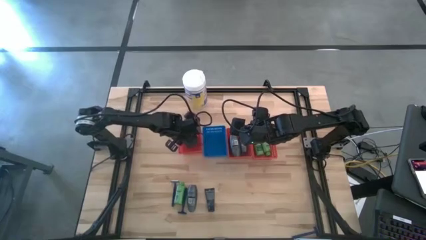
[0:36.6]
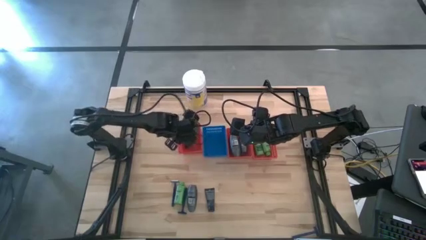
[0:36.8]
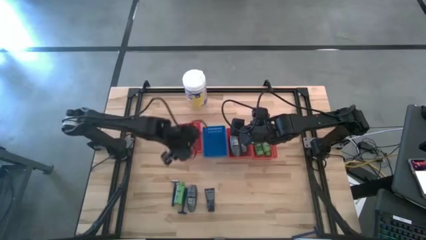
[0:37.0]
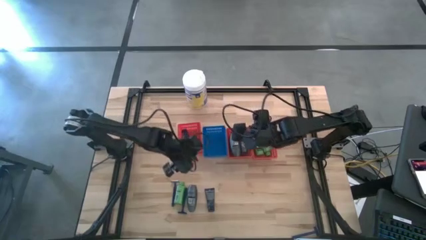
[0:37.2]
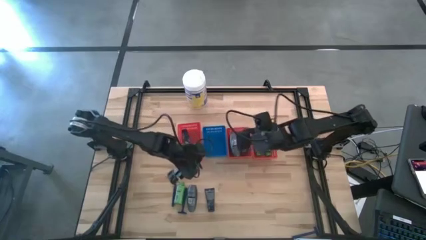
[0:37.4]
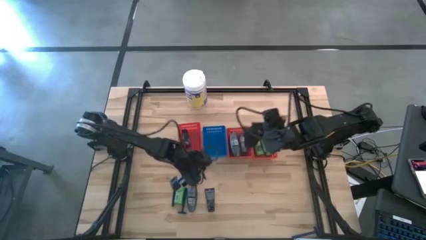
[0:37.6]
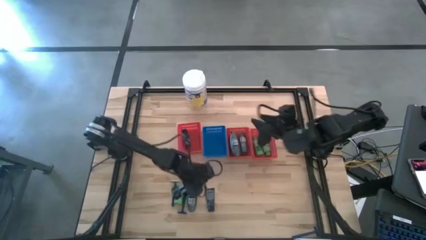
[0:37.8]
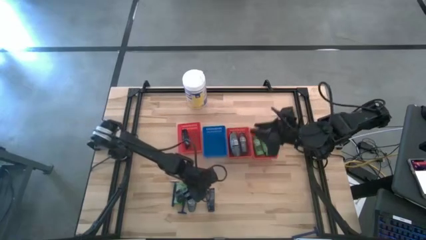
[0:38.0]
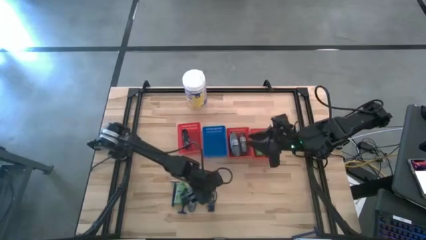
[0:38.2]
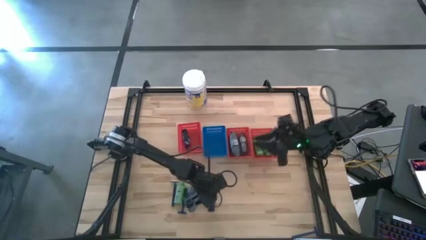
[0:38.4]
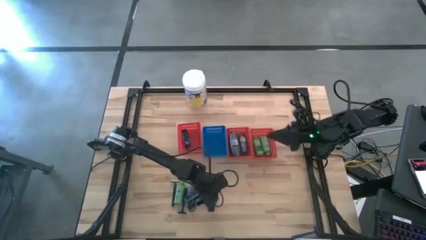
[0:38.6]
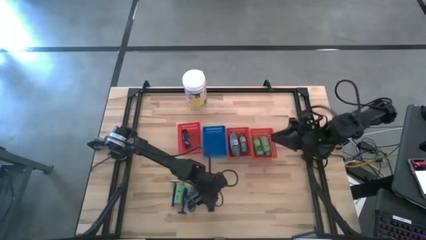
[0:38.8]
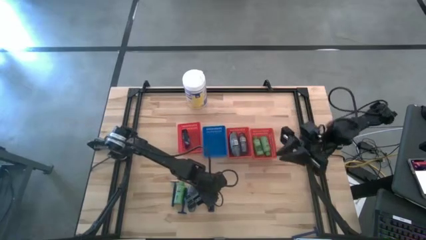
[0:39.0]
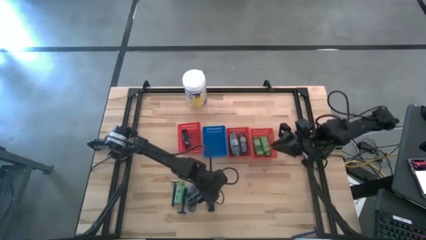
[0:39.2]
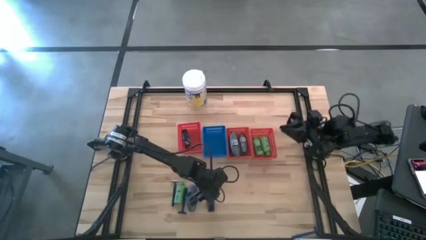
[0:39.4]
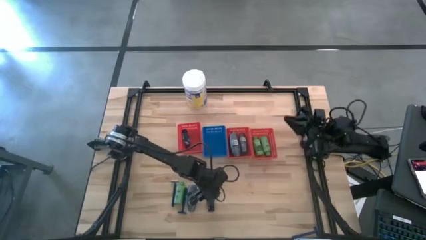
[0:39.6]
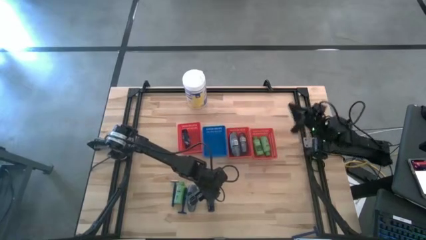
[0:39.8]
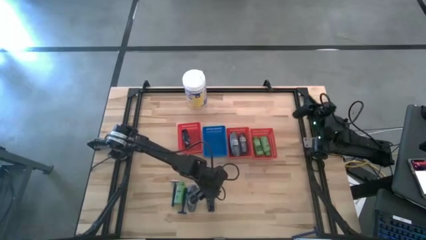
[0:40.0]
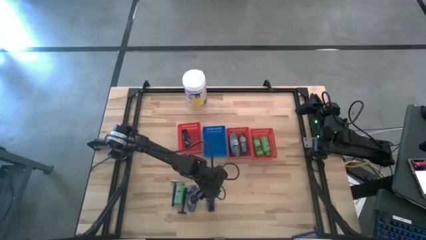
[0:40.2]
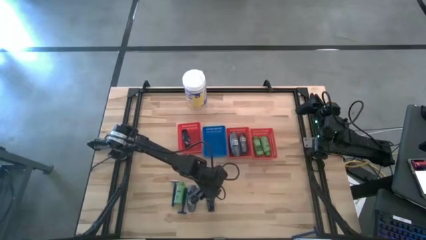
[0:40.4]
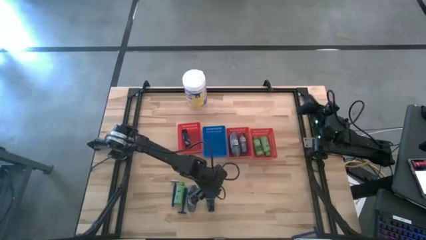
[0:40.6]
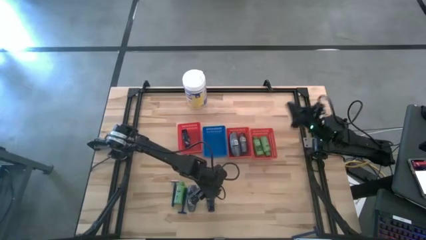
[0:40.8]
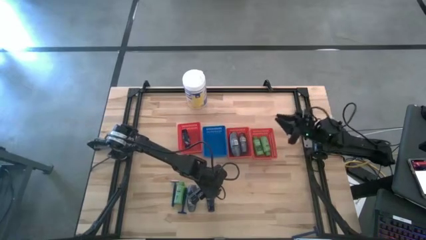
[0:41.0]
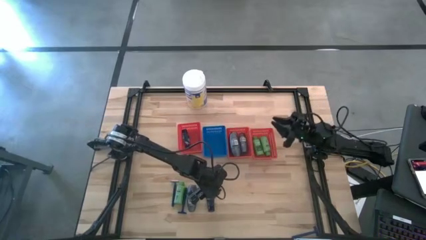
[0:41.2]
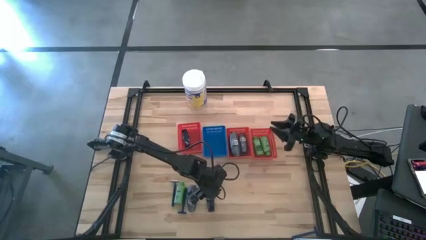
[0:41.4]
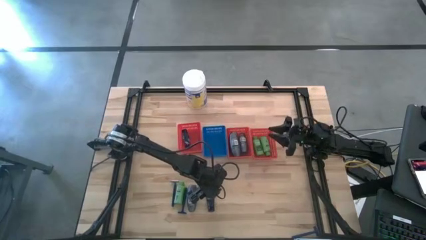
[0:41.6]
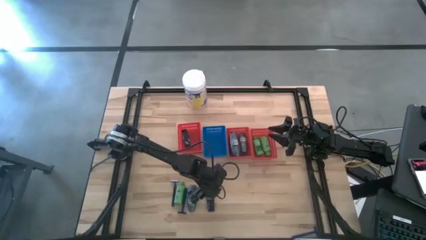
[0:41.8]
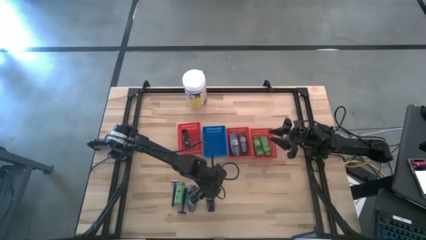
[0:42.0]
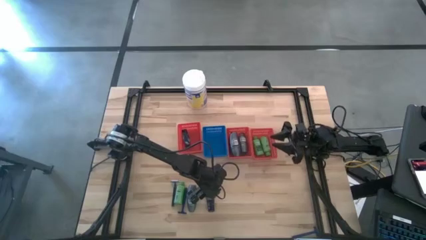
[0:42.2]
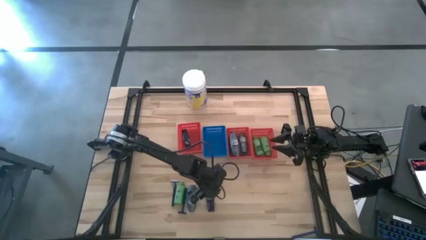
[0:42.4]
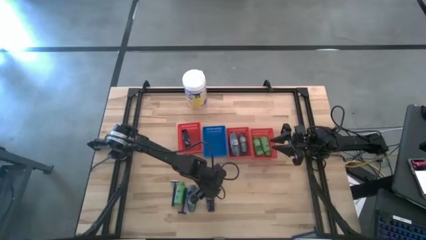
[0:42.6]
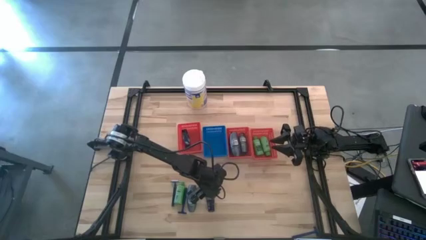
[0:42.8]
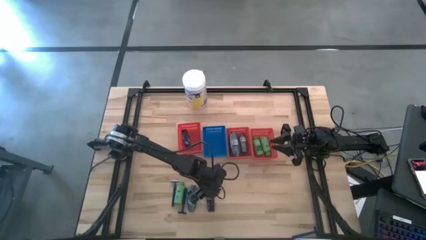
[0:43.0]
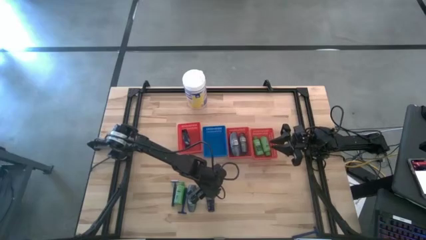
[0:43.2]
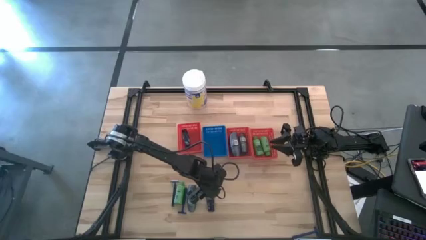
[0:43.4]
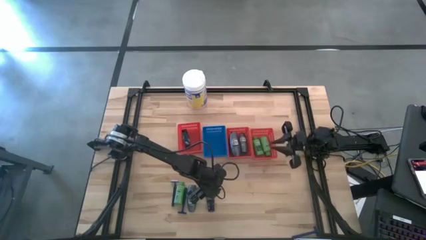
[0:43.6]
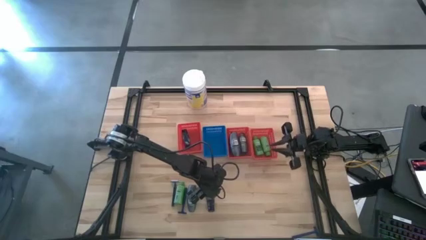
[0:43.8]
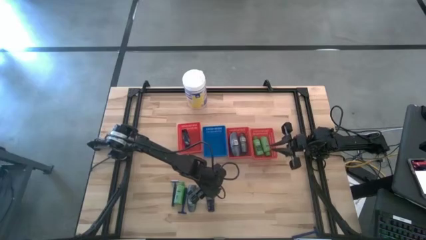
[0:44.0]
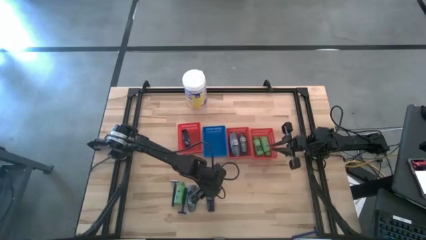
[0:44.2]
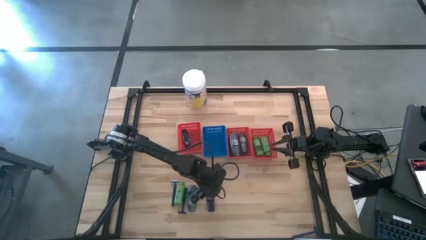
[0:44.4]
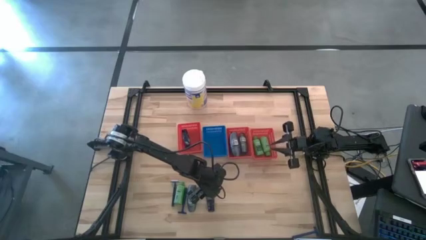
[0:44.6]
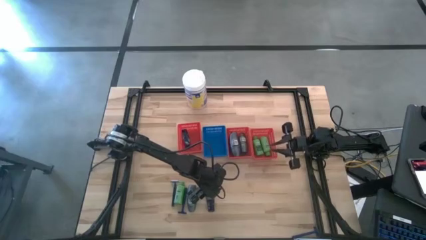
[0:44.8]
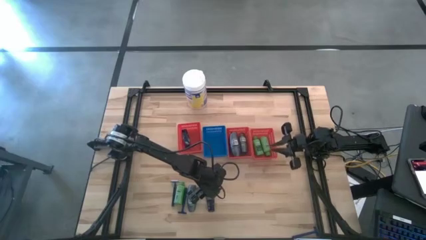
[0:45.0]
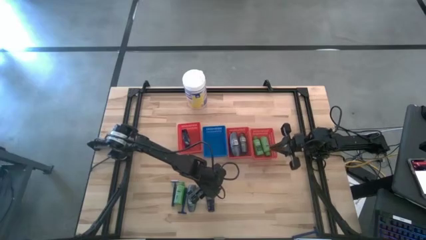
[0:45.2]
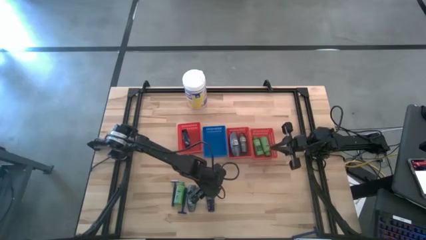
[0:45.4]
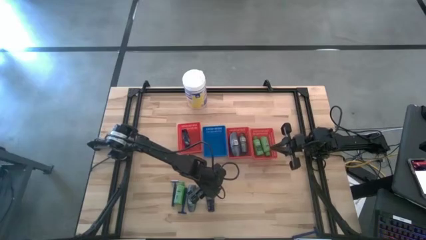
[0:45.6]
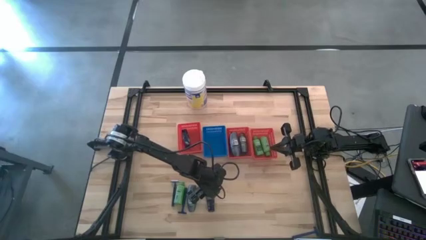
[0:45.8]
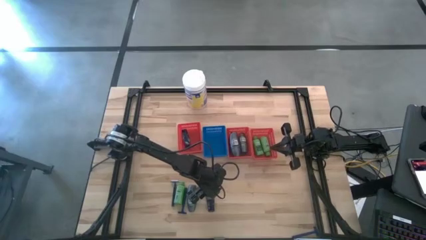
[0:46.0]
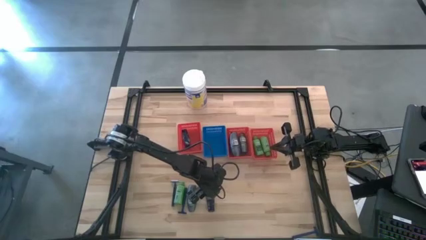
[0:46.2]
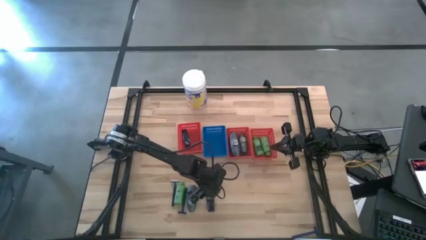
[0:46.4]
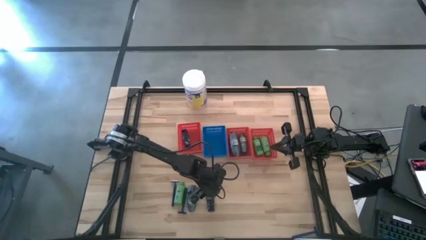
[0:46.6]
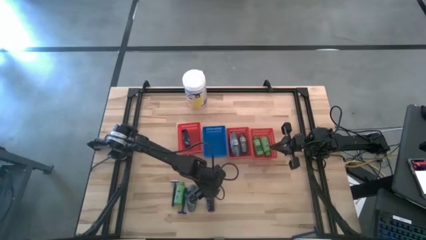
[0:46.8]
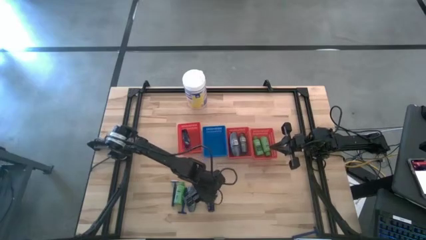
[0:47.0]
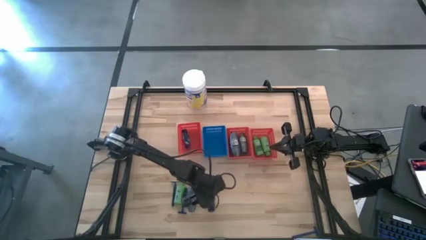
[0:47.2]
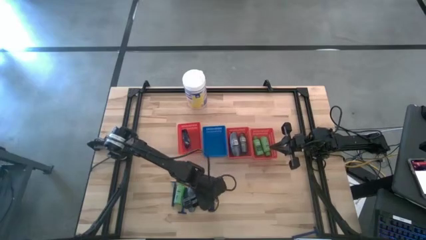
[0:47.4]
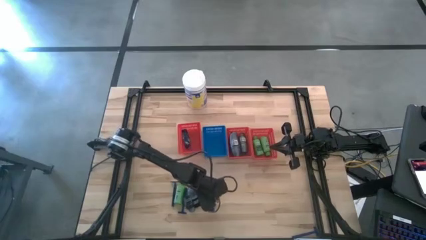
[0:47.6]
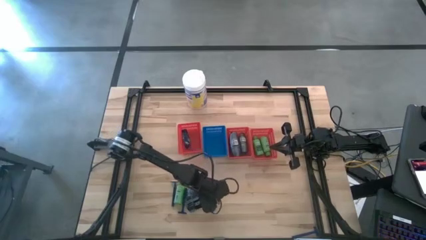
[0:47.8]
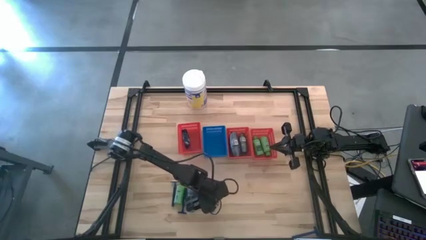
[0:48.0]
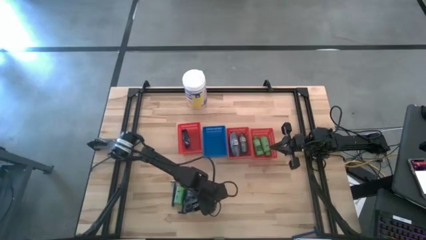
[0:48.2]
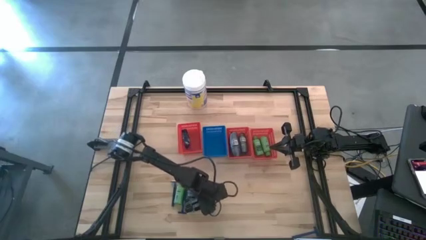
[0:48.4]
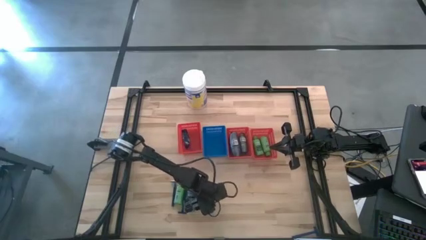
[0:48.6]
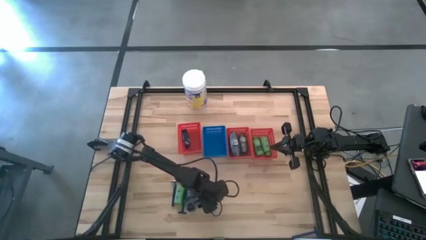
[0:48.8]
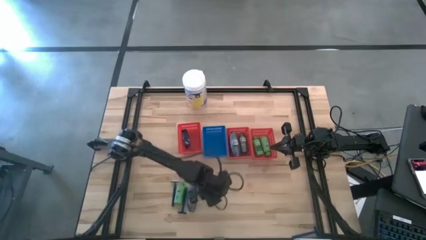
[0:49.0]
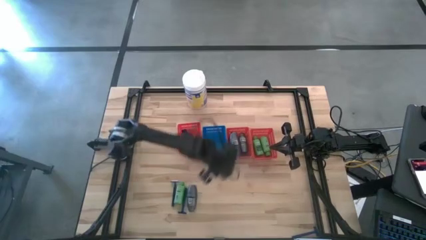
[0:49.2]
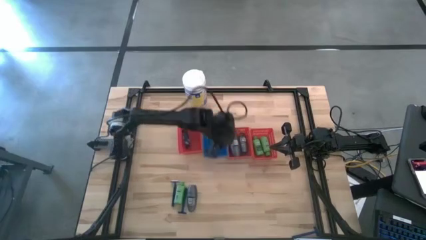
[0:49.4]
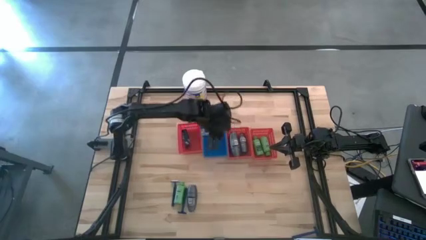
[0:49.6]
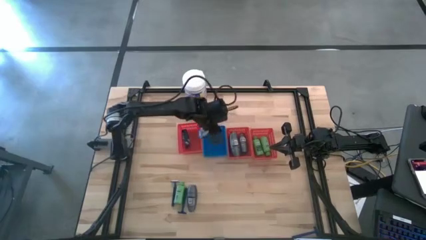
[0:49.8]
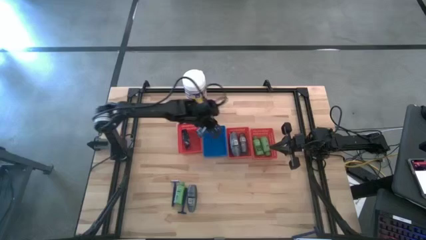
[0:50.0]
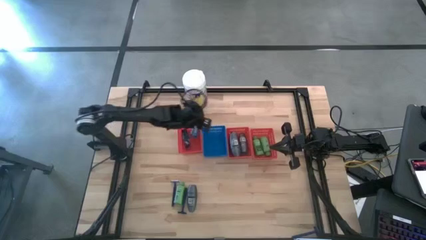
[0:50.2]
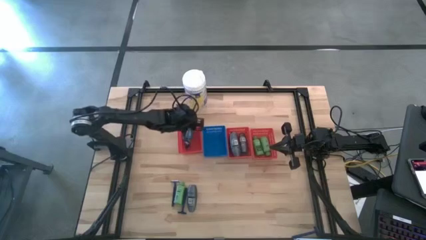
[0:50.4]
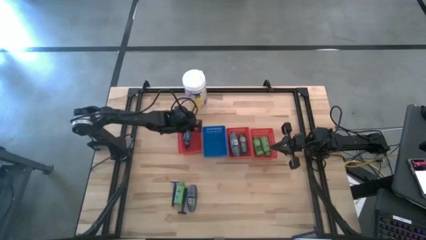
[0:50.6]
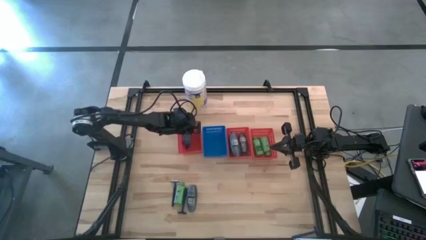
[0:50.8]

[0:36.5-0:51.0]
Task: Pick & Place Travel size toiletries
Put the blue shave cream into the red bin
